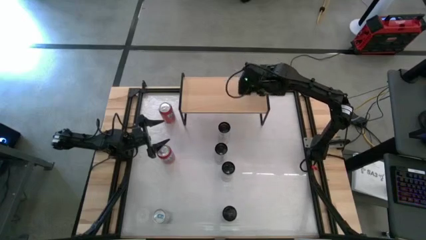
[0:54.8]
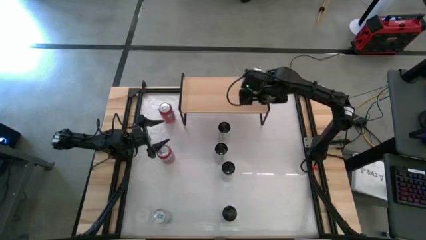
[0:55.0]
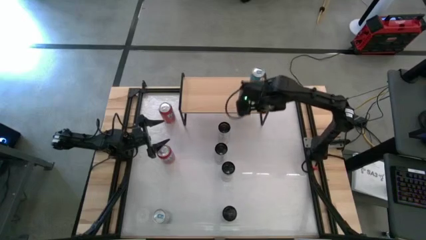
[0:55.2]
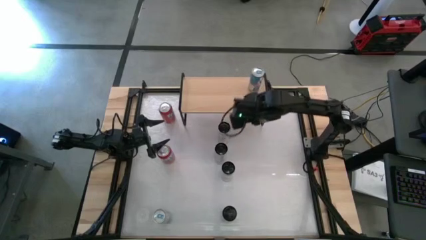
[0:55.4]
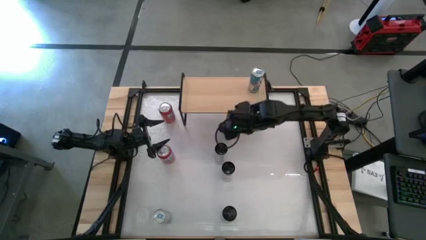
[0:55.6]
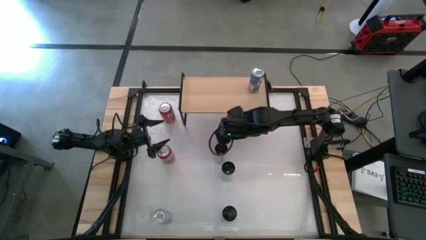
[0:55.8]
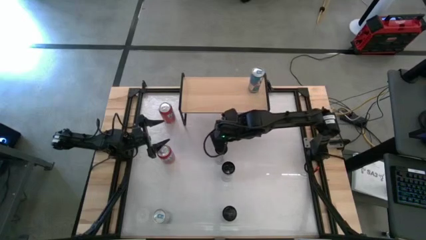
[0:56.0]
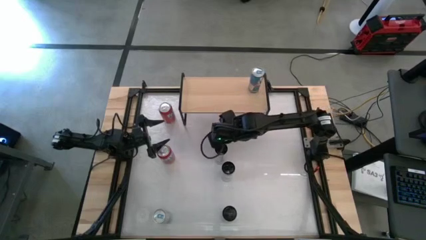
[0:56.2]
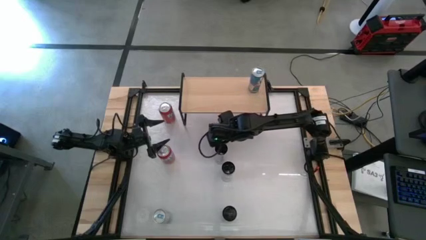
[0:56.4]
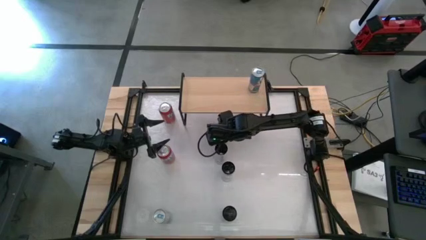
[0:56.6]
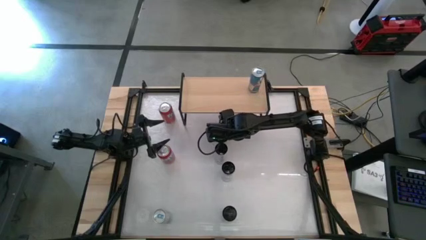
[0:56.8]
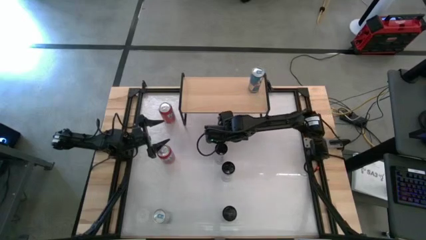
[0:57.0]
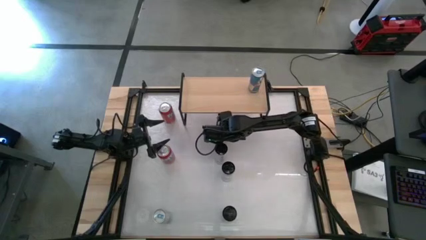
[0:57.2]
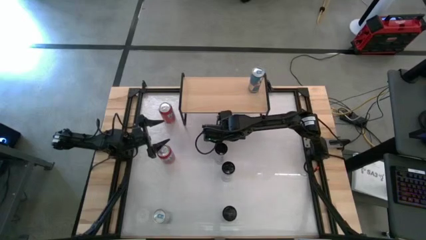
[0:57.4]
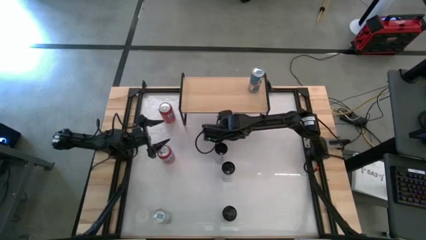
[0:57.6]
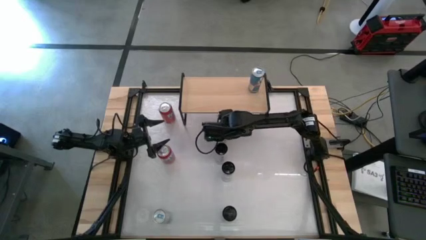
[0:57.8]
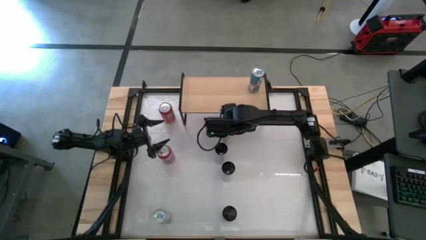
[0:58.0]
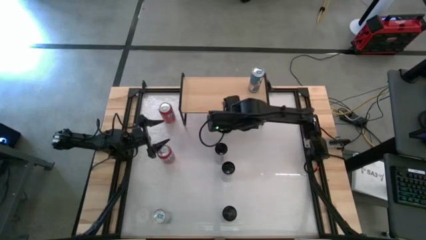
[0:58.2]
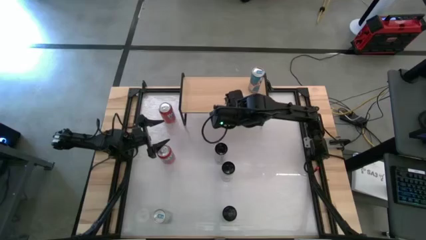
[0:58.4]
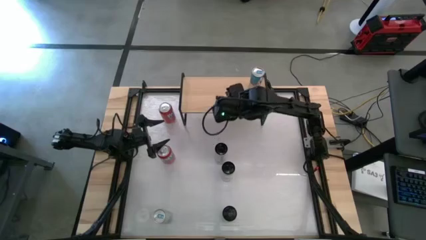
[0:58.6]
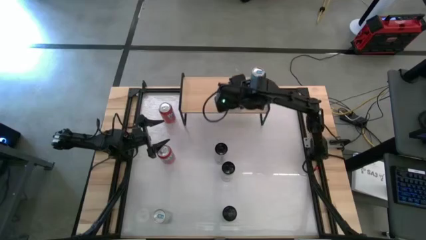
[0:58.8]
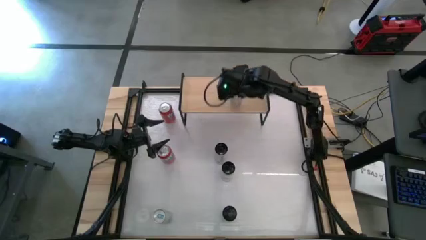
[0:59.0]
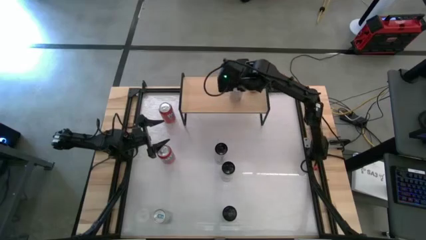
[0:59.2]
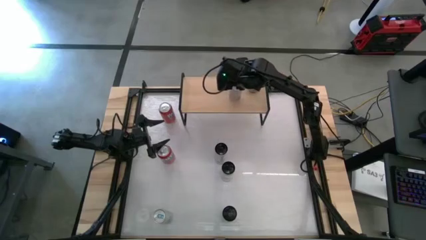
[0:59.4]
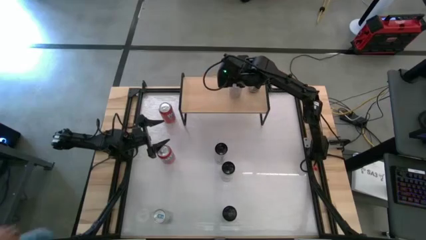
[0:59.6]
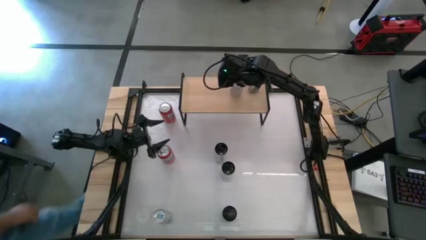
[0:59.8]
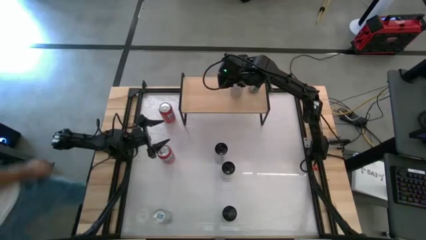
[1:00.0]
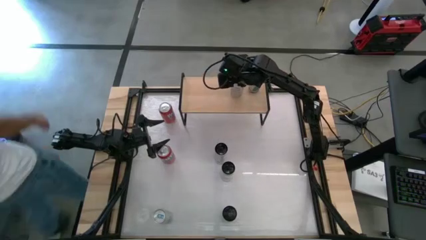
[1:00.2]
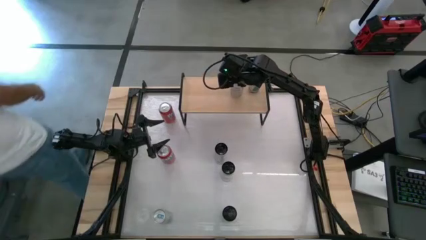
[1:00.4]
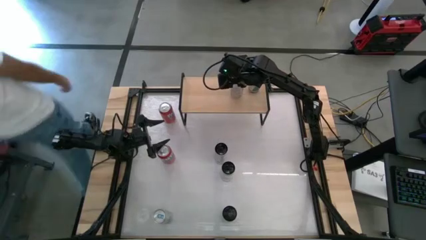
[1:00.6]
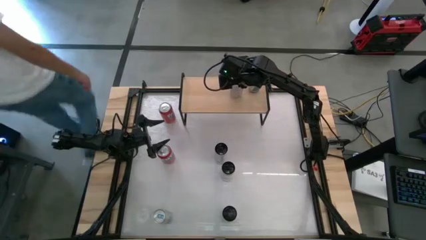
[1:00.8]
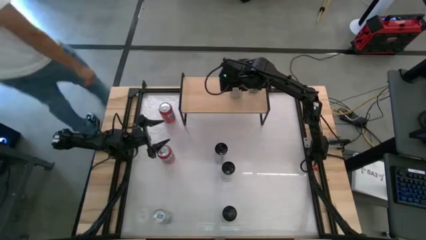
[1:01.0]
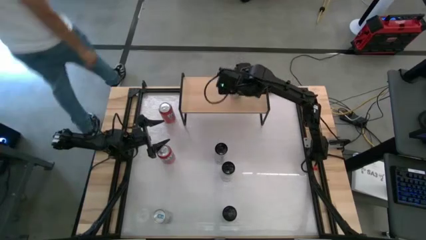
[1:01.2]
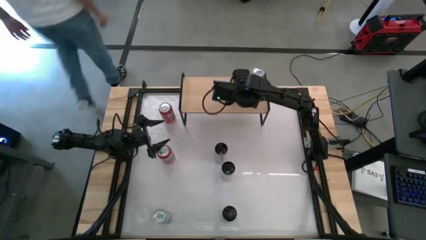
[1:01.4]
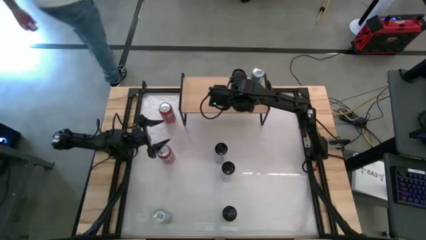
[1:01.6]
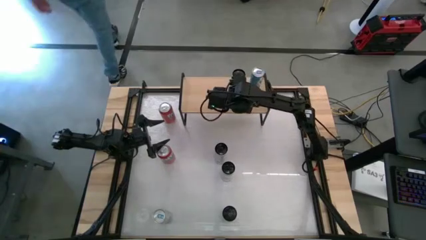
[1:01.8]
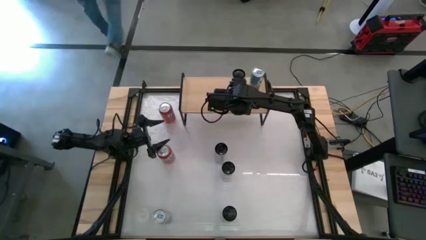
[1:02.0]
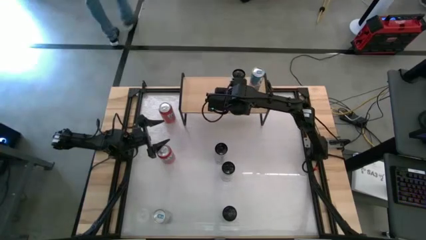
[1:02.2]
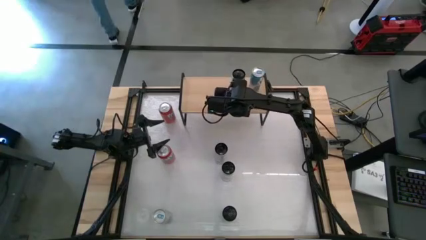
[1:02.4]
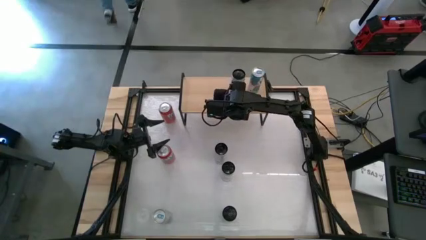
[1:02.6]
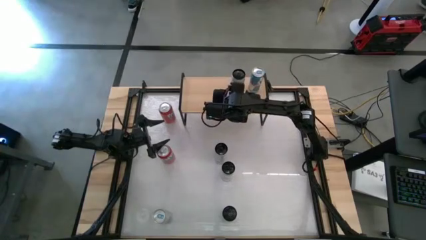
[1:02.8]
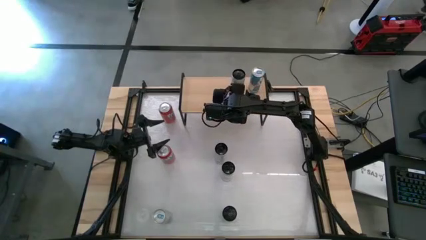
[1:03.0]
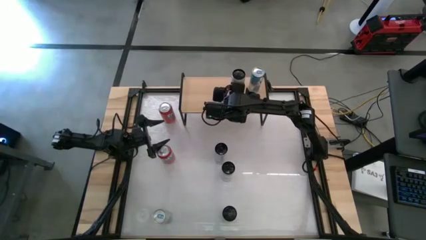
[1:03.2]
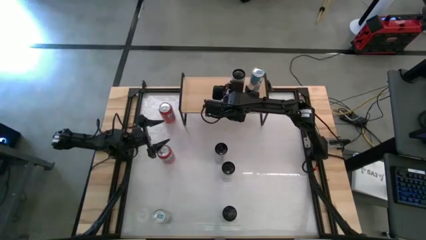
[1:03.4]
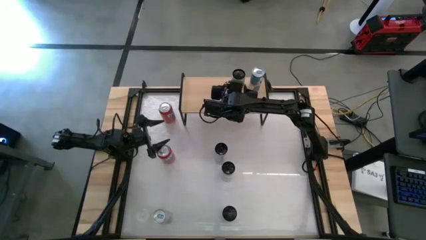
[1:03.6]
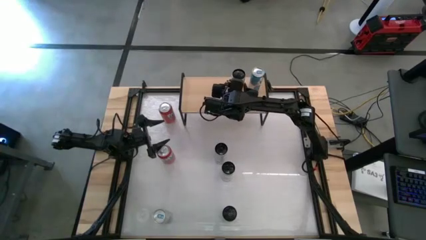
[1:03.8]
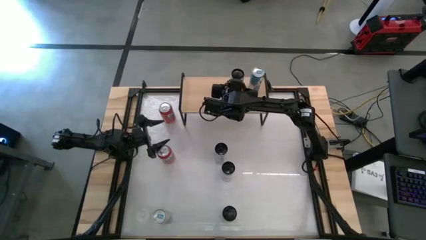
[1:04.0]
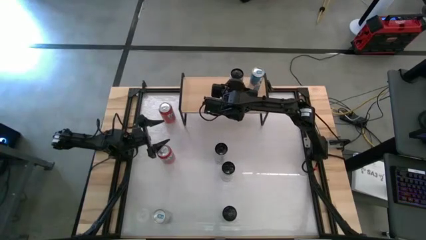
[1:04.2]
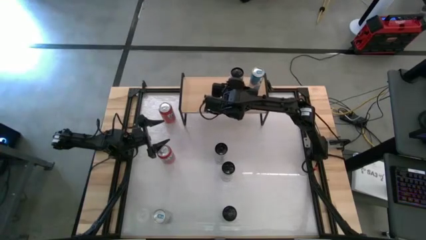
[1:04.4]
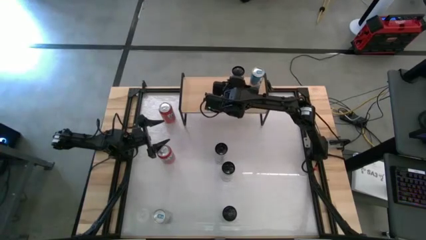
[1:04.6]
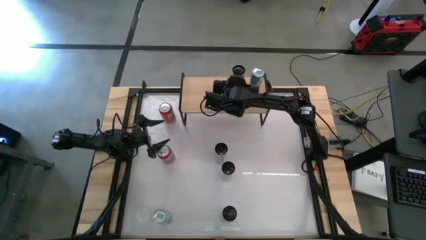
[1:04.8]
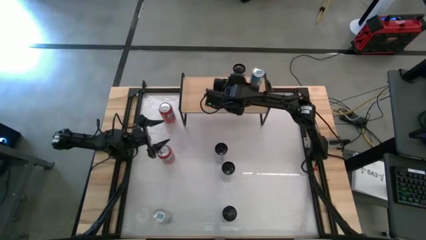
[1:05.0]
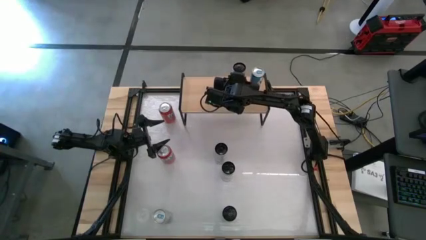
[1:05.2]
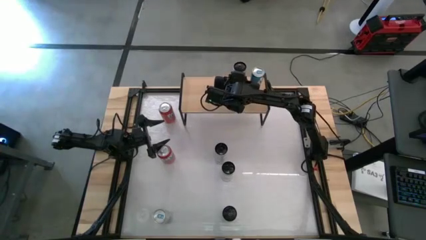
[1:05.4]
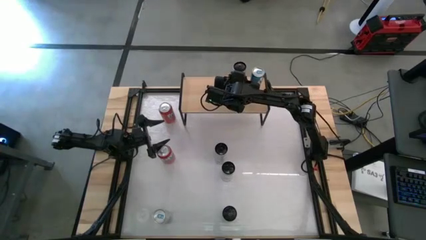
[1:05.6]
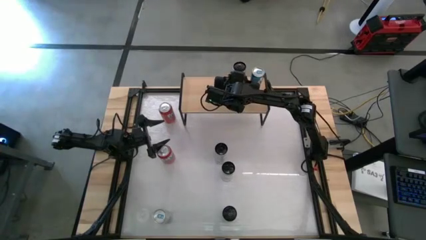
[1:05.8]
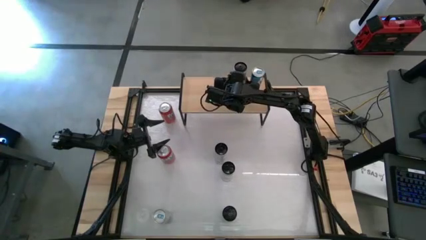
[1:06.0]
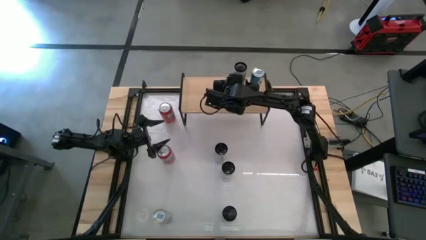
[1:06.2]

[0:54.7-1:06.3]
Task: Place canned beverage on shelf
Put the top white yellow soda can on the shelf
